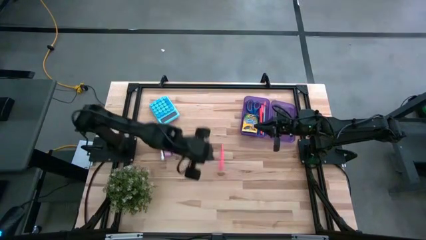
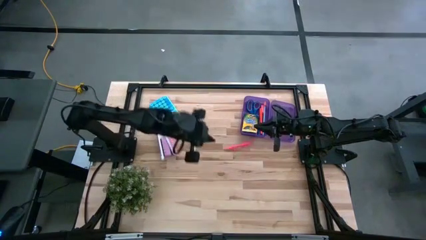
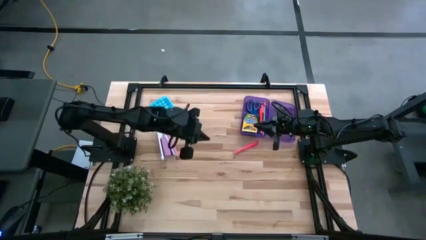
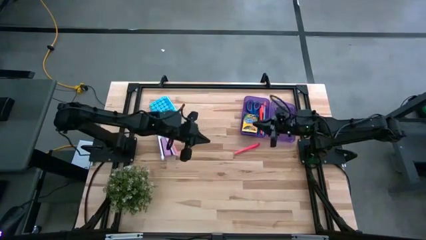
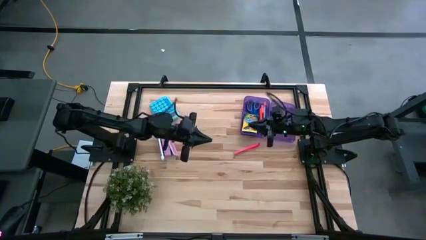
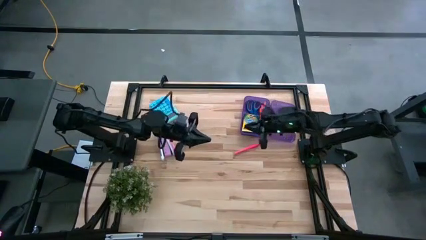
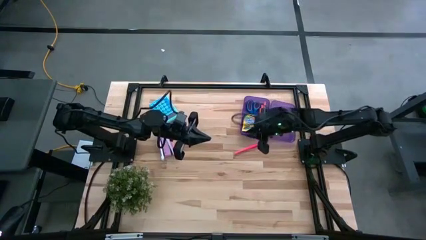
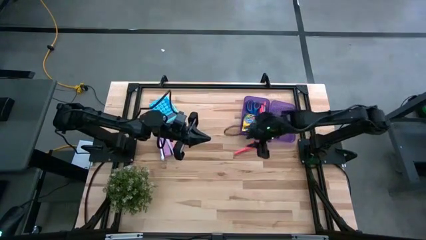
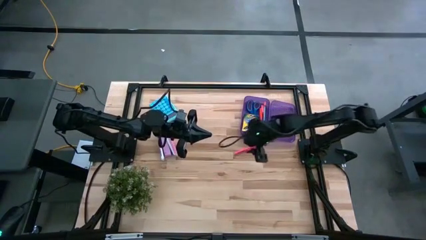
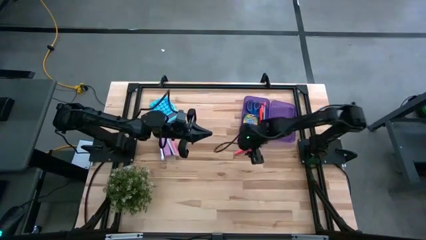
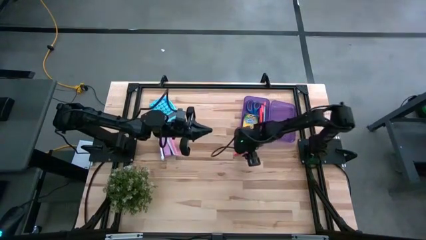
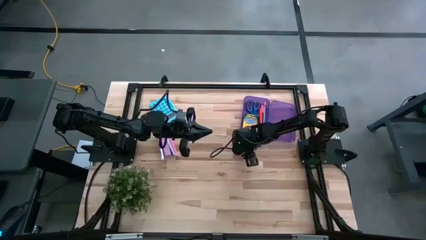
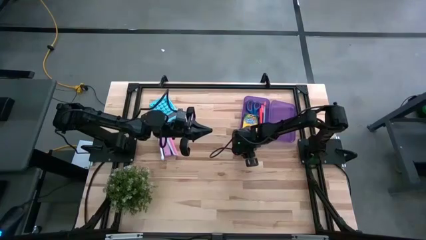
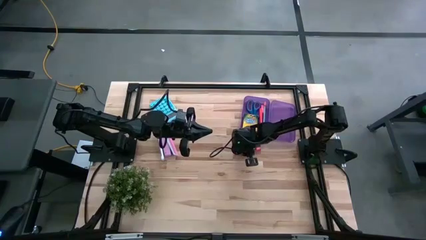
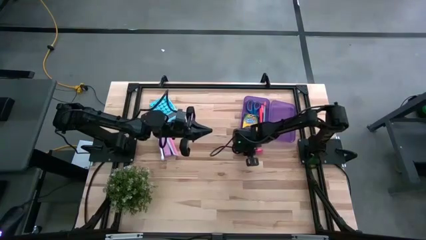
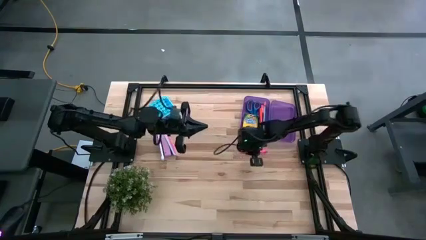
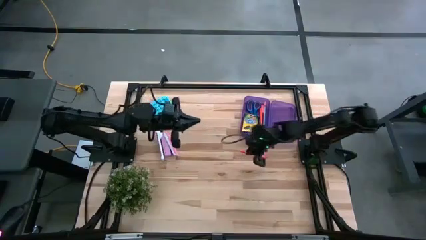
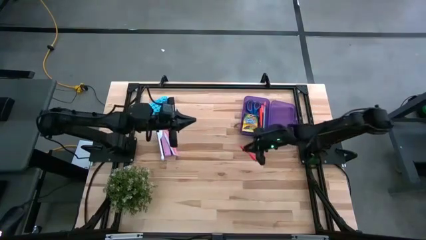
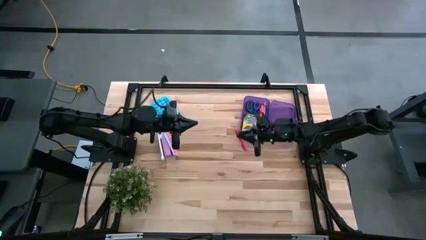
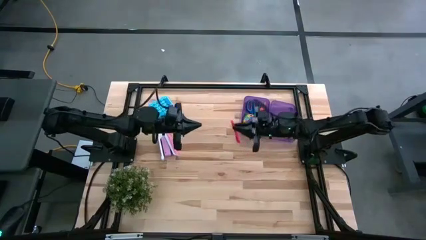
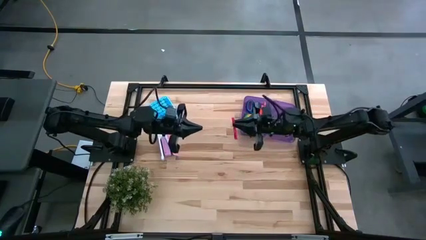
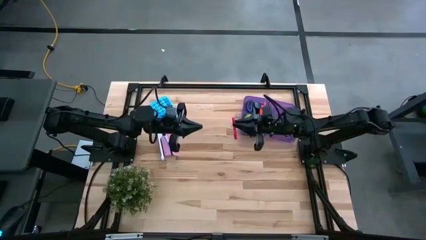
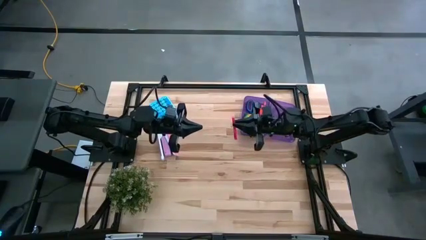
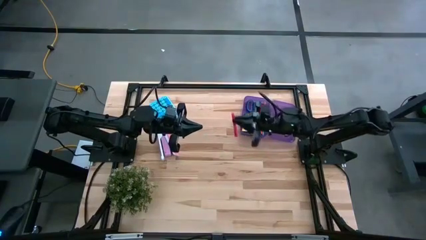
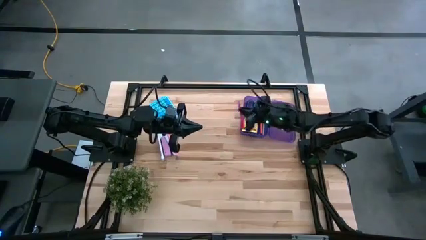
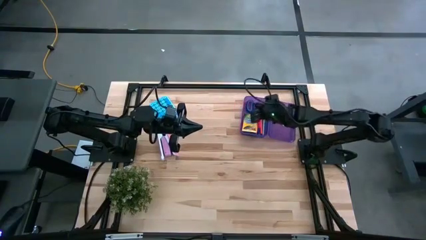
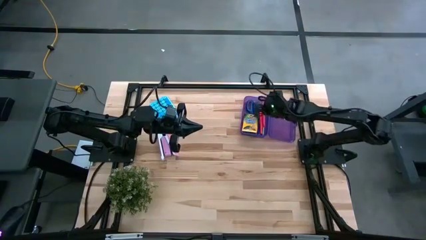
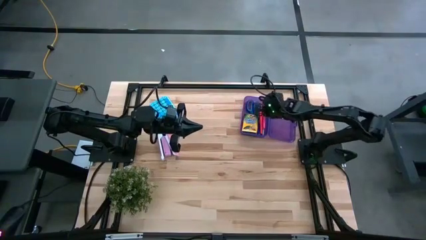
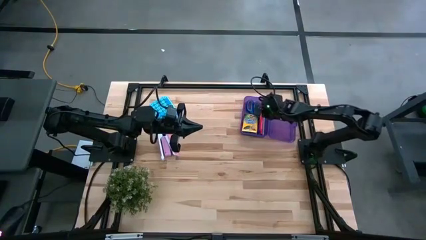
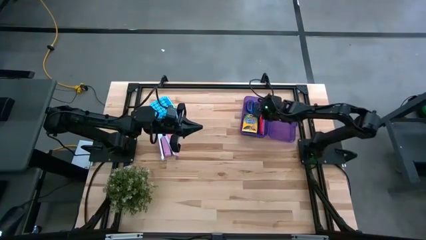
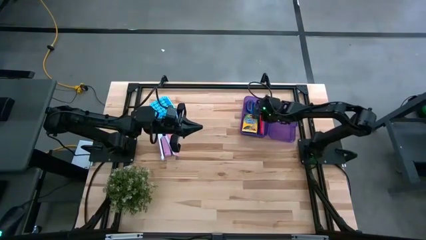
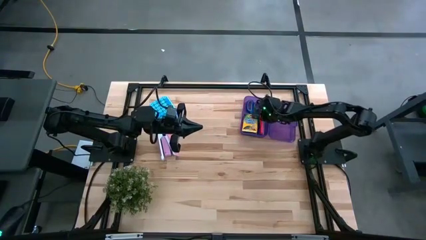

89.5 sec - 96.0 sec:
Task: Pack school essentials
Put the pink pen into the violet supply box

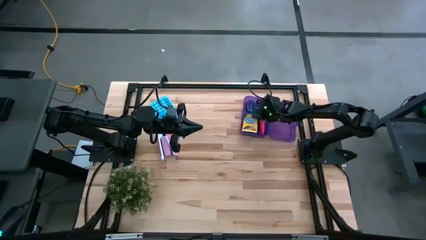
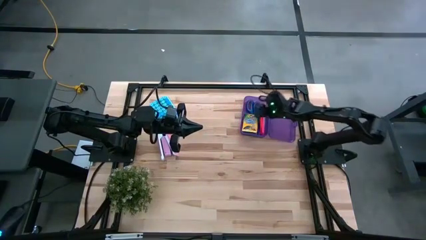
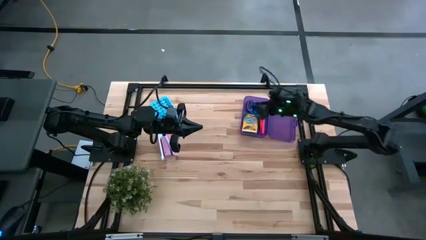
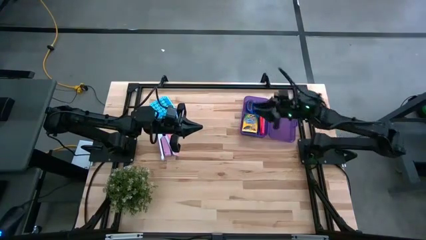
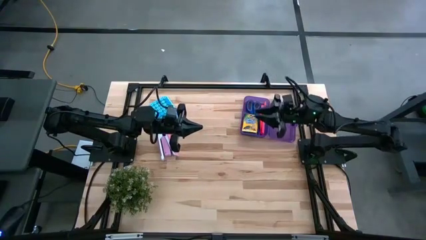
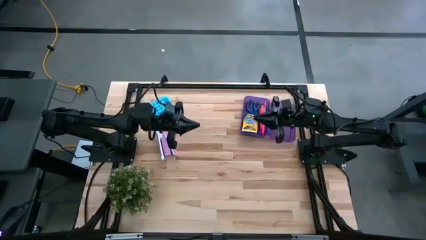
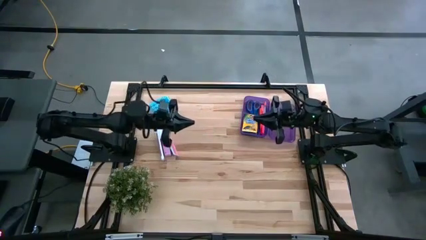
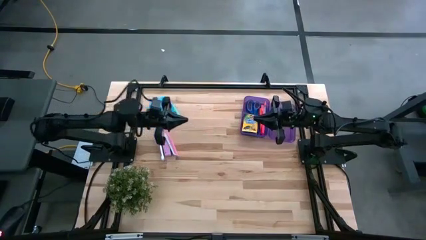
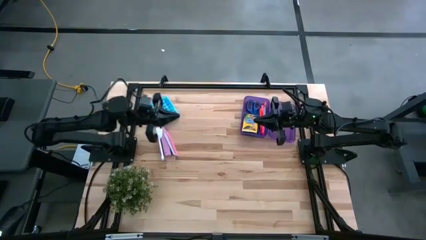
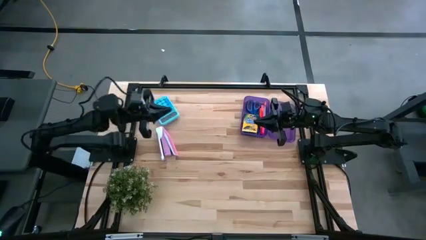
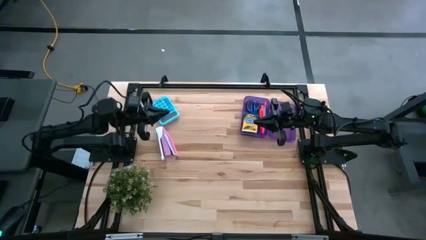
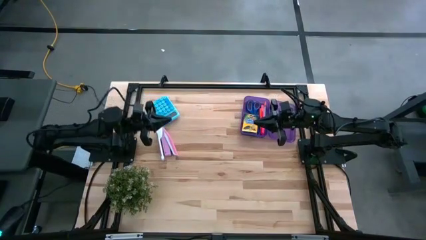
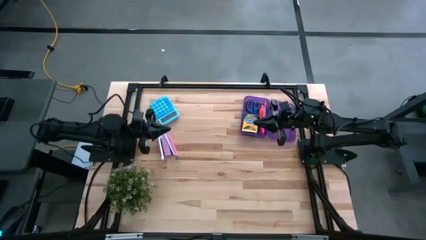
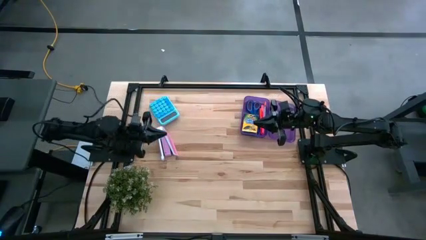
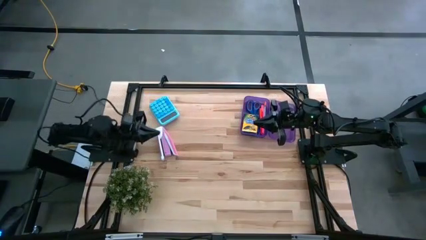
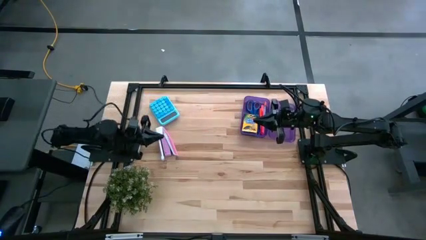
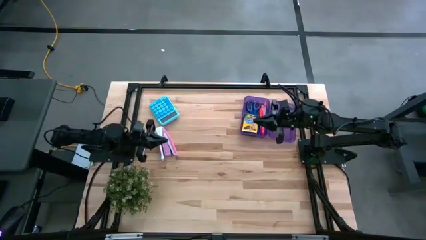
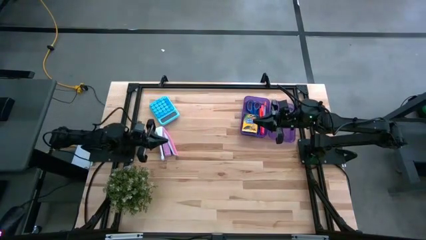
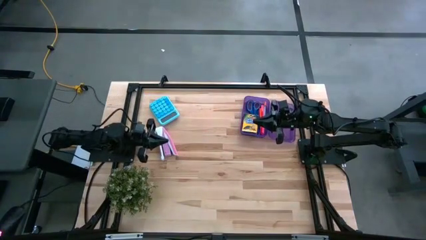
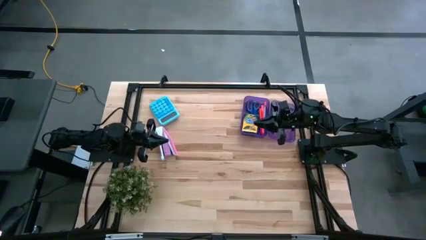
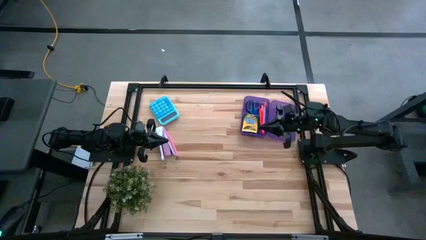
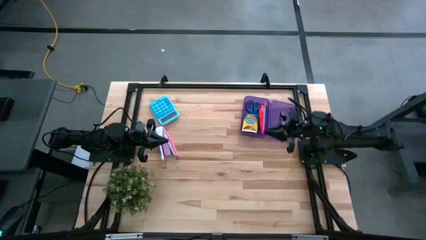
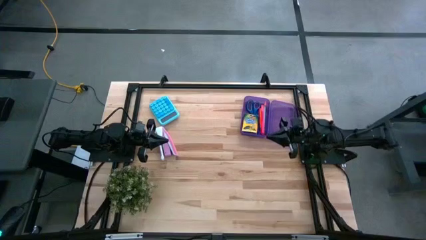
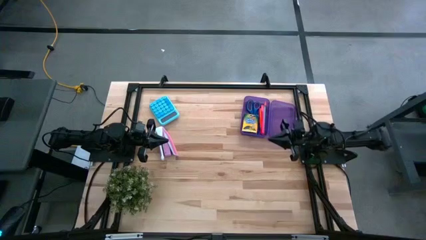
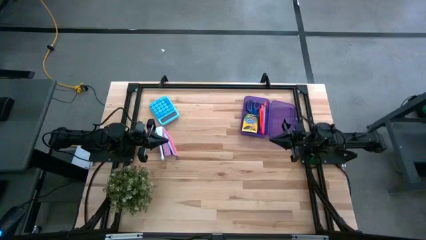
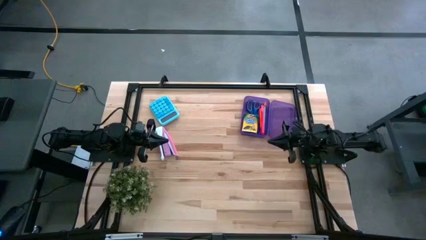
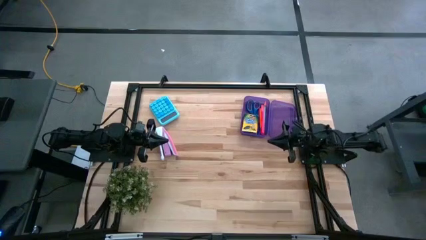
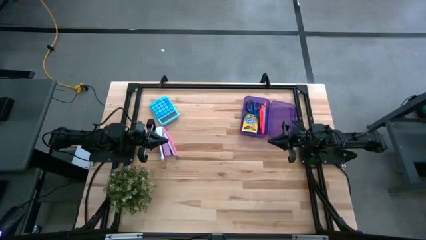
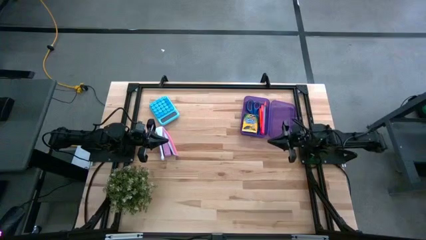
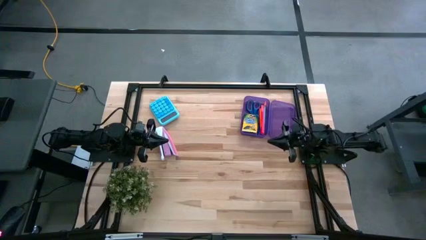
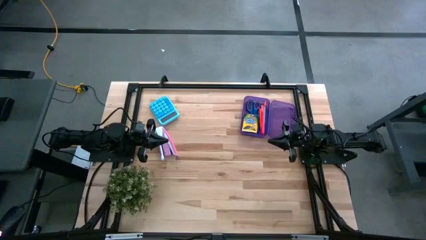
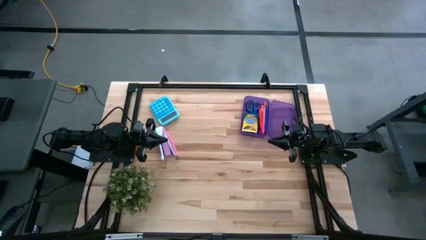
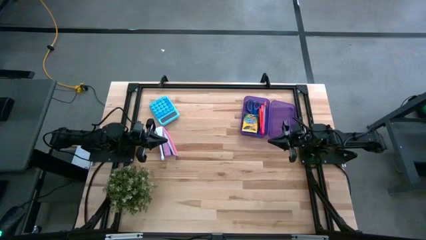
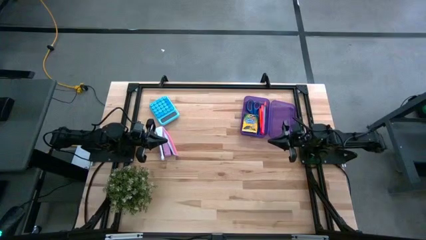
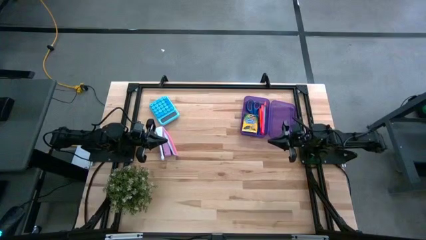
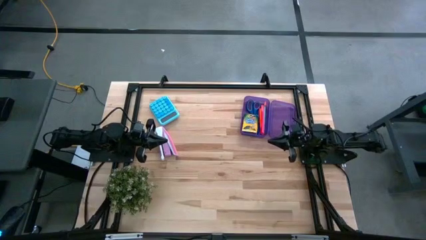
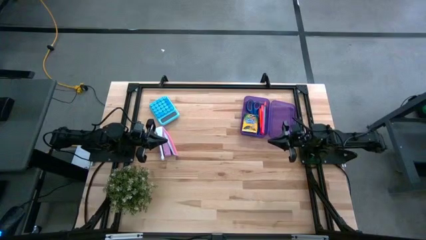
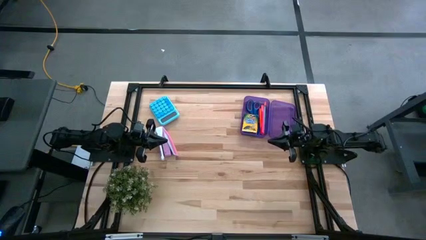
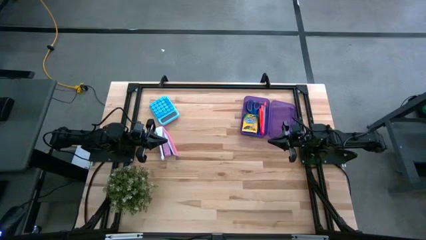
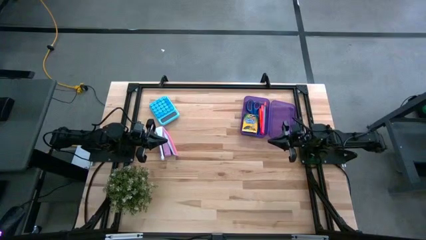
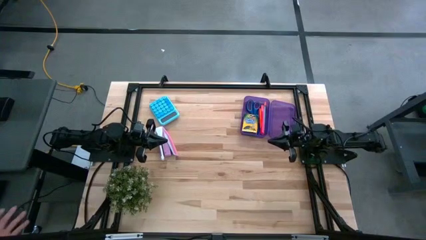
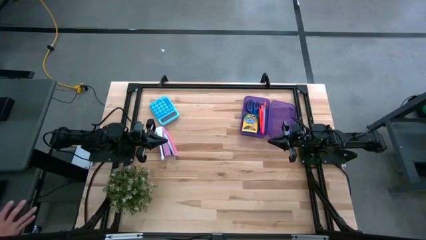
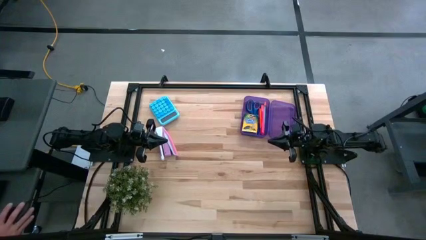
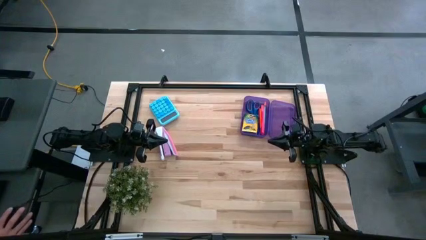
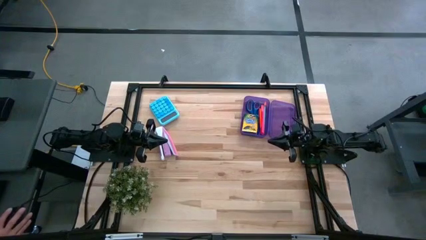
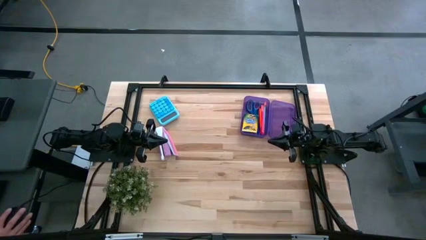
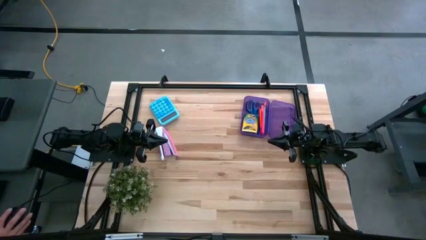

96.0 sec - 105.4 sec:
Return to Home Position
